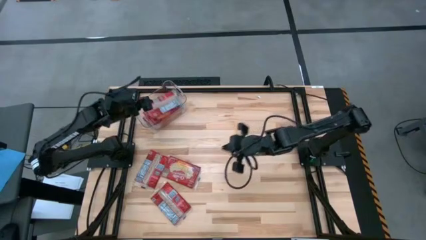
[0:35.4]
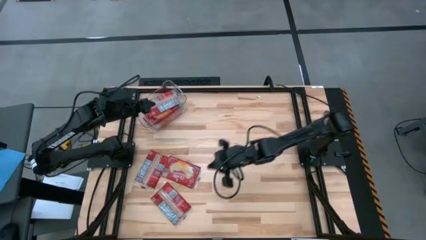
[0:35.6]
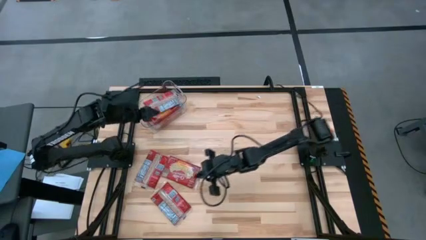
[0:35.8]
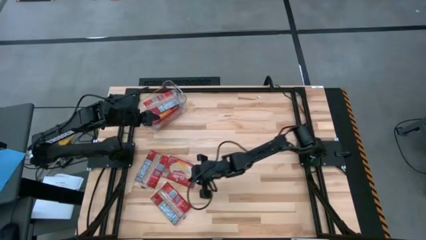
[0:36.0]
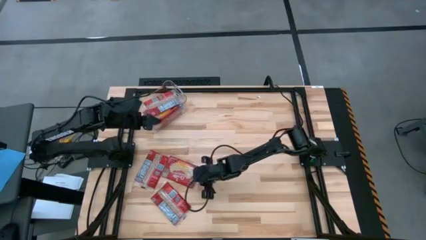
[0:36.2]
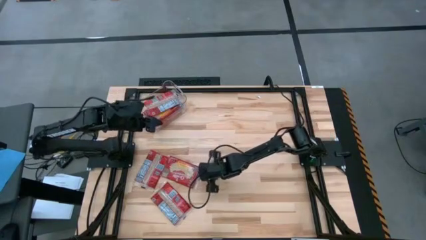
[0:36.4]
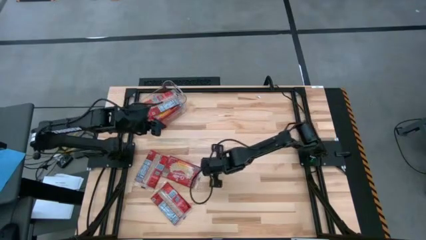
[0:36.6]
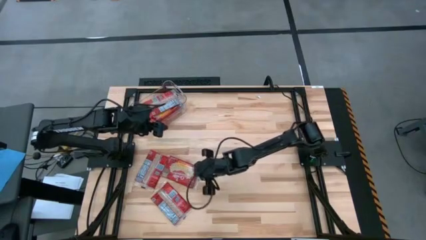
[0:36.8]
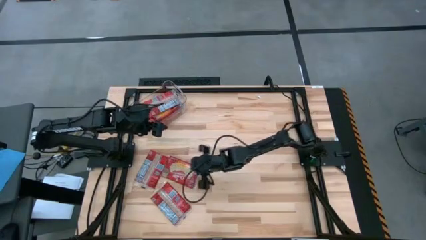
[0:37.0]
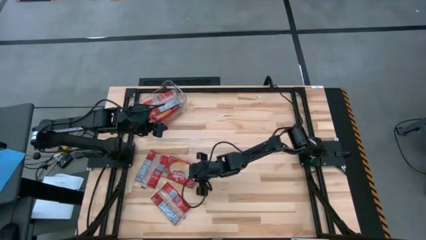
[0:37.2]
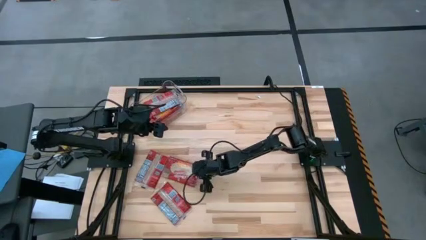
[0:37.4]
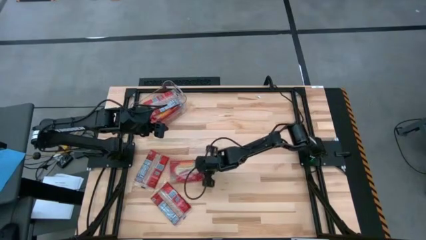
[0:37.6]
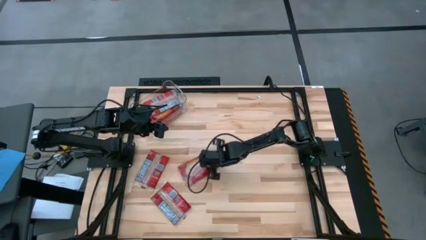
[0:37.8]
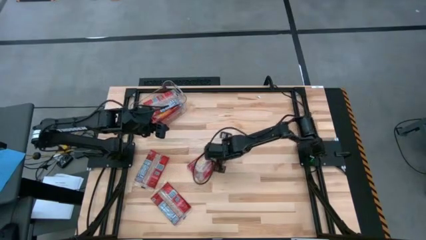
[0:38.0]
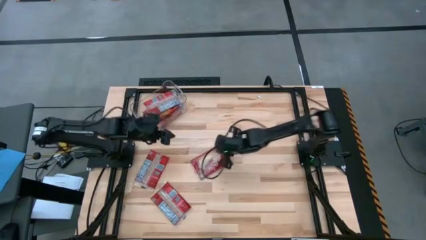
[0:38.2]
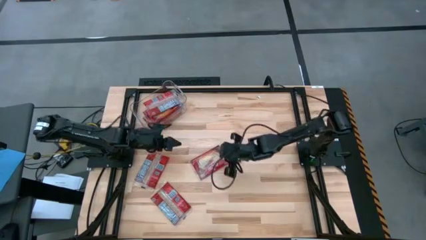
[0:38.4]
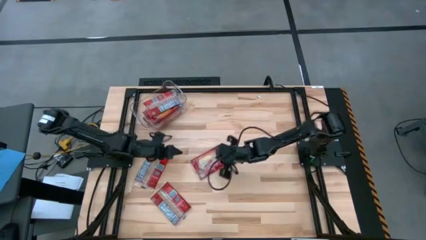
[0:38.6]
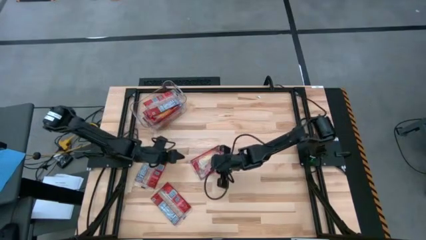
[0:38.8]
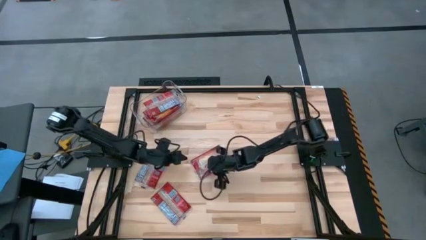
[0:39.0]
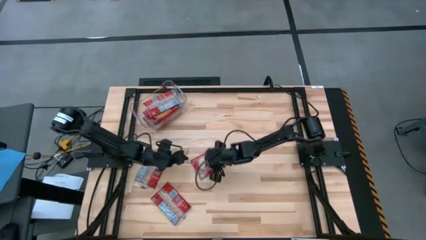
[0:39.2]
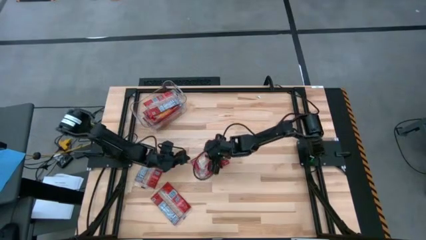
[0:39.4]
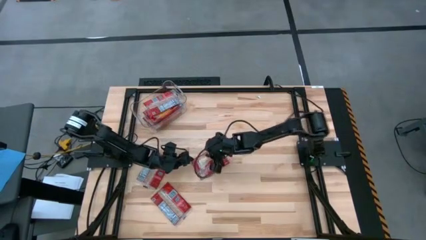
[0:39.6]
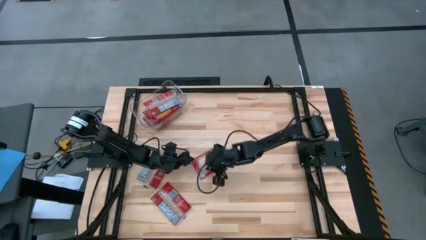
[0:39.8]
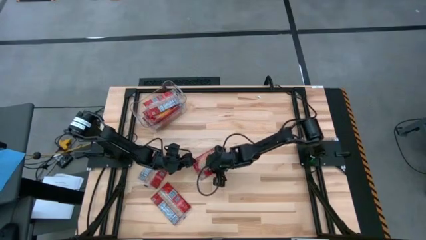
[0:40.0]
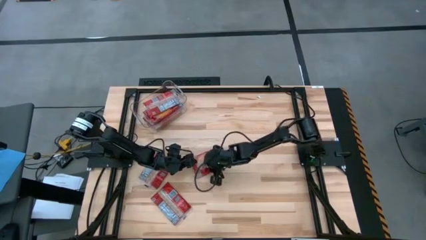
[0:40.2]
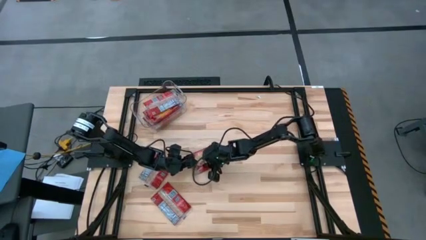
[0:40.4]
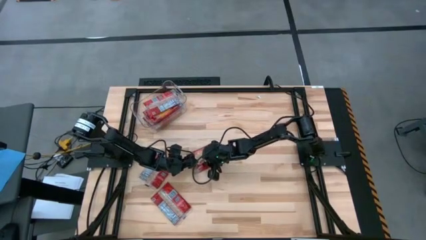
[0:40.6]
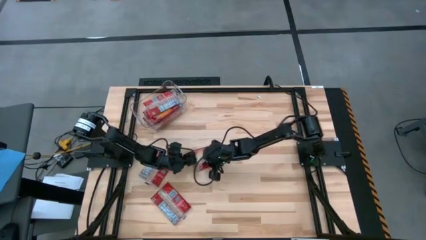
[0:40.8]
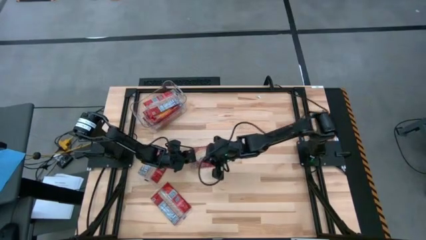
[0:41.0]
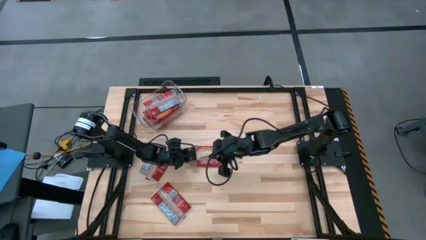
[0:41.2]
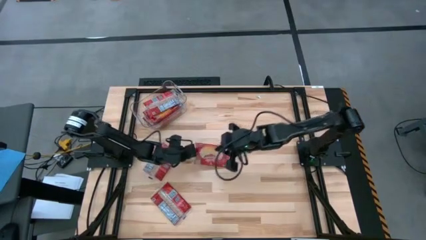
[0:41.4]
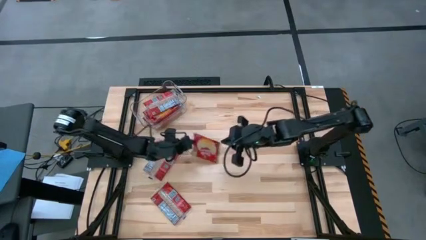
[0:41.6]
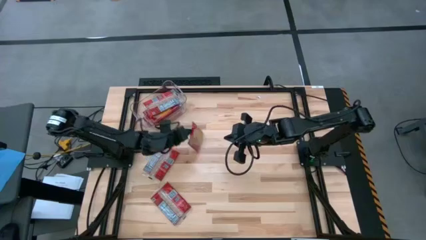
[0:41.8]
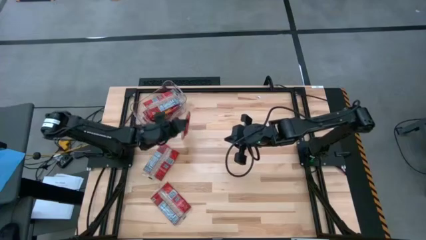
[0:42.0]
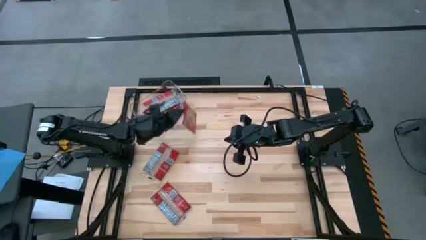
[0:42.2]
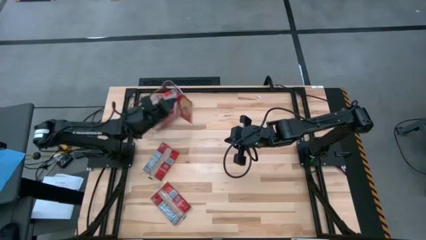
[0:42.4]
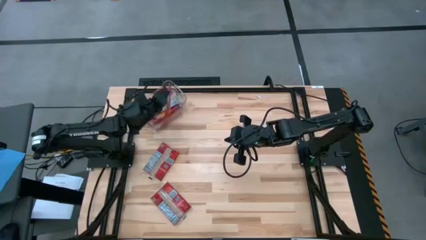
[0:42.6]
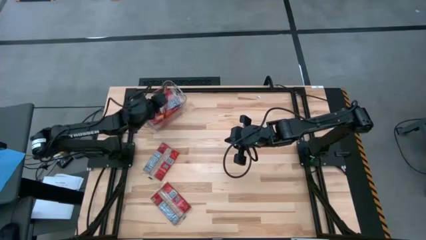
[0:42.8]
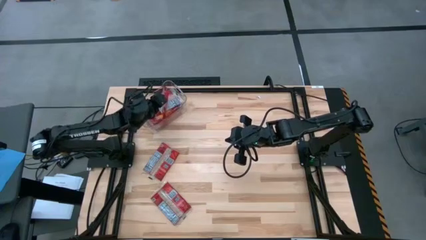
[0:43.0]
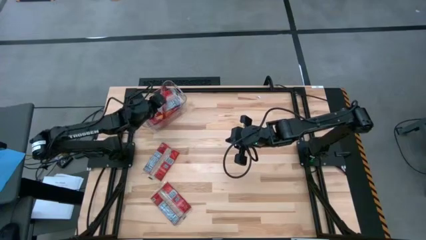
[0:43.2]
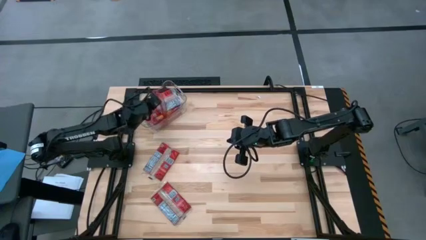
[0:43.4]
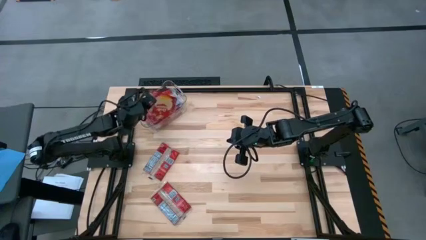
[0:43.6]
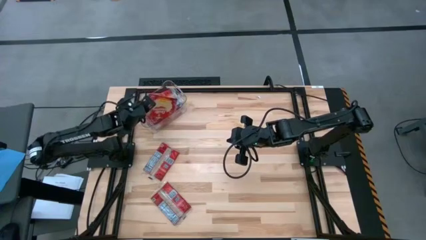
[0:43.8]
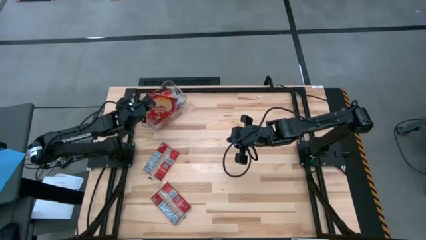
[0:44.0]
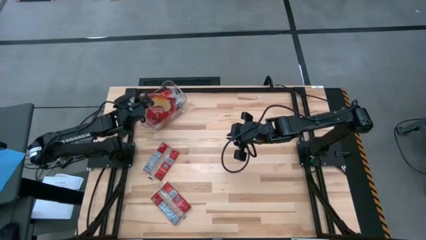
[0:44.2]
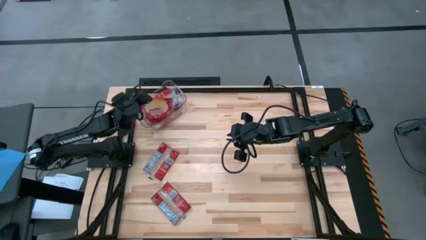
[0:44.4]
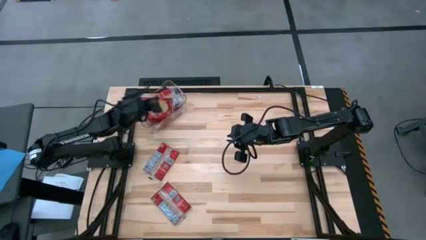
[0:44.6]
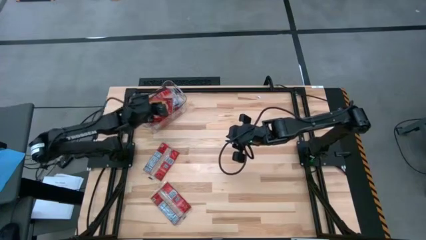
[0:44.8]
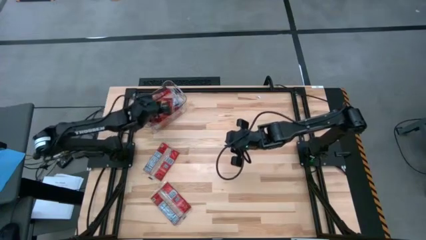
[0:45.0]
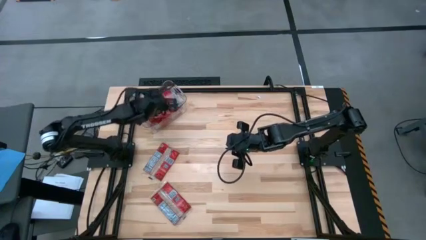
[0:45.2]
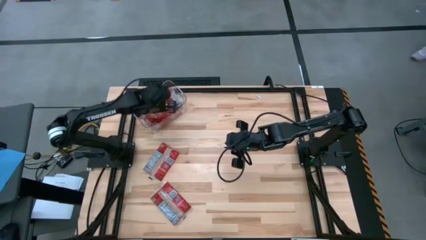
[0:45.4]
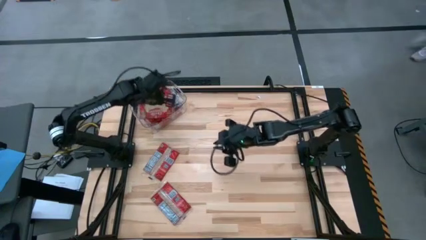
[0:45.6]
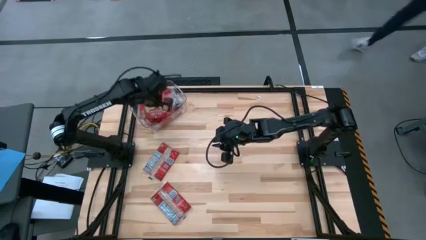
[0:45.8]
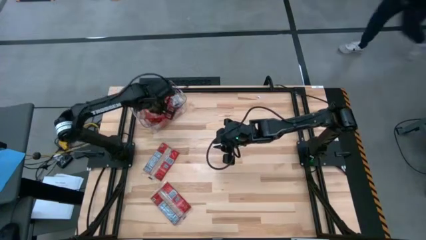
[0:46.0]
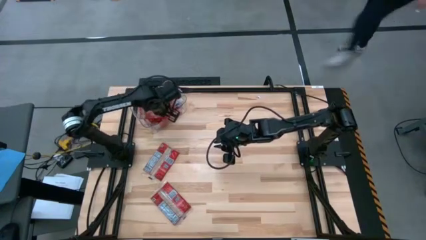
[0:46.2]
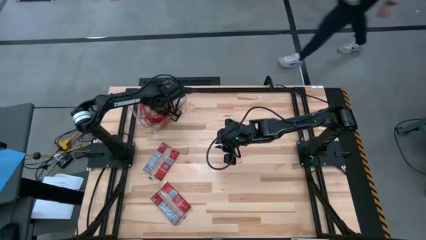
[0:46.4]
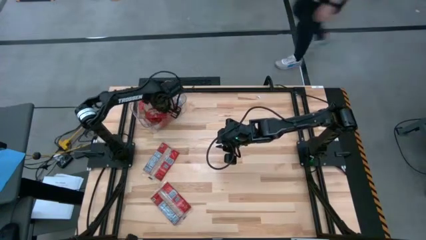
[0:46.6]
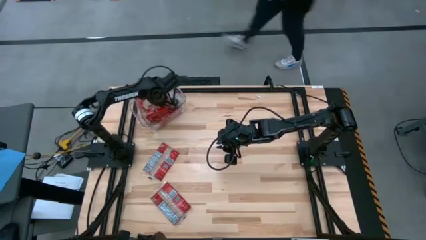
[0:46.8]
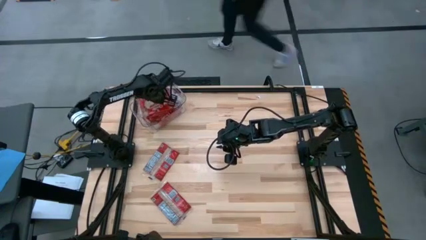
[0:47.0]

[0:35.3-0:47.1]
Task: Sort popcorn bags into baskets
Put the red popcorn bag into the transparent bin

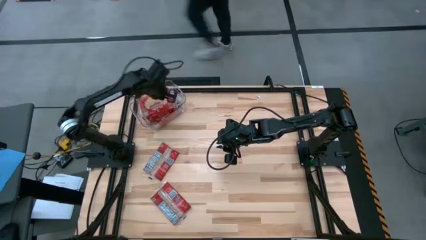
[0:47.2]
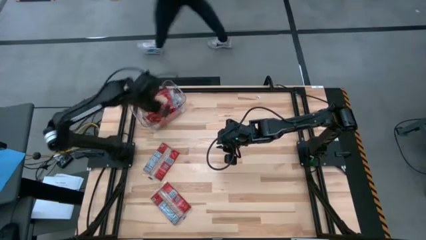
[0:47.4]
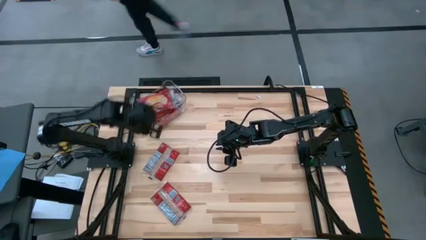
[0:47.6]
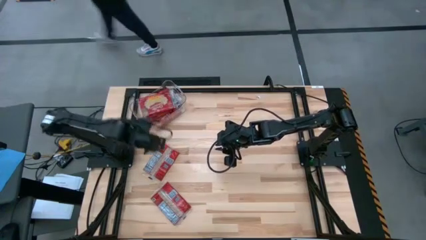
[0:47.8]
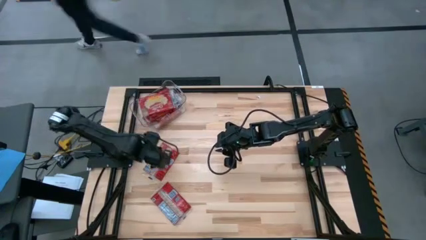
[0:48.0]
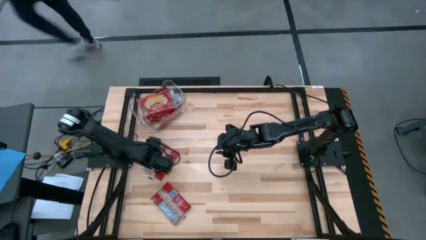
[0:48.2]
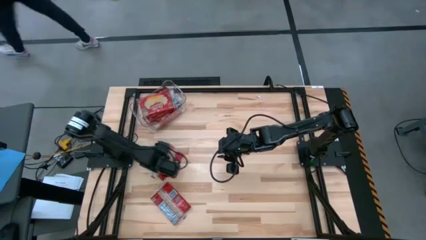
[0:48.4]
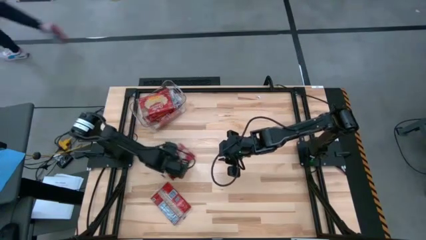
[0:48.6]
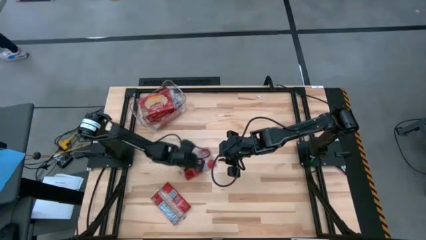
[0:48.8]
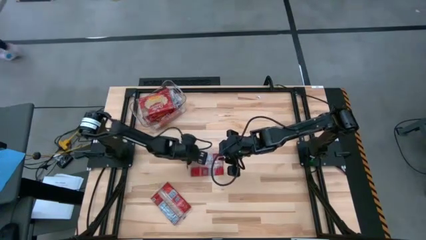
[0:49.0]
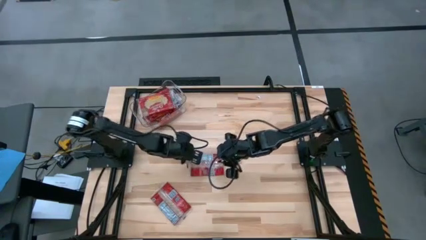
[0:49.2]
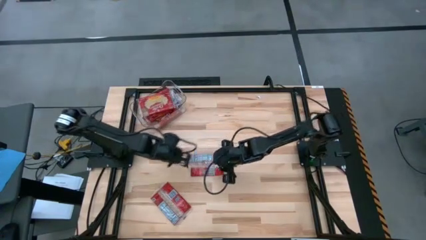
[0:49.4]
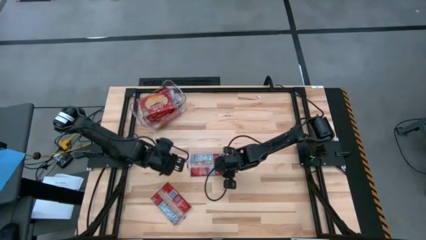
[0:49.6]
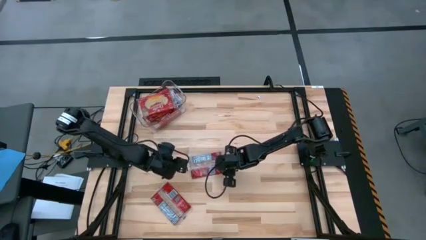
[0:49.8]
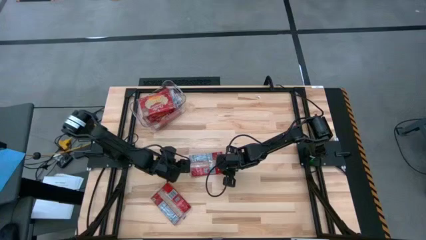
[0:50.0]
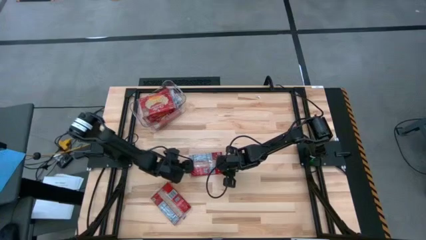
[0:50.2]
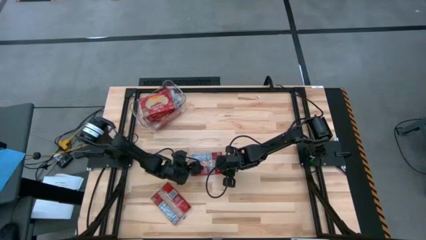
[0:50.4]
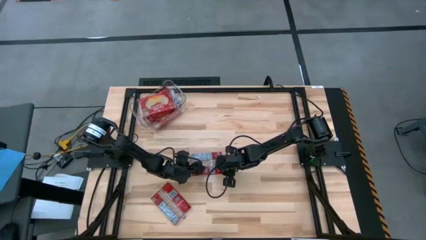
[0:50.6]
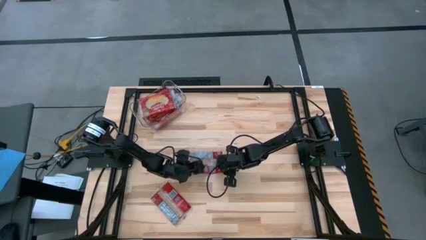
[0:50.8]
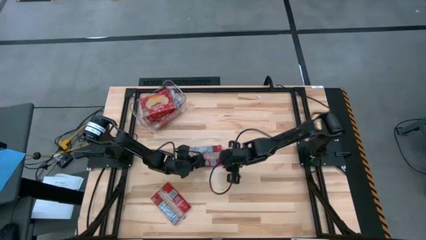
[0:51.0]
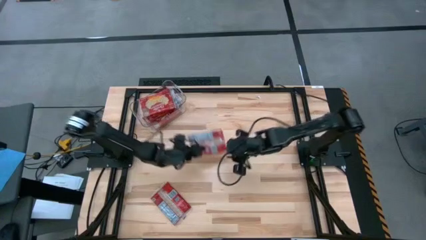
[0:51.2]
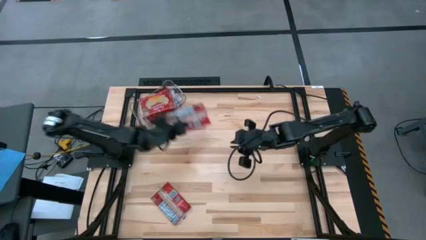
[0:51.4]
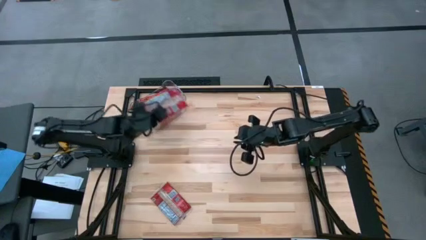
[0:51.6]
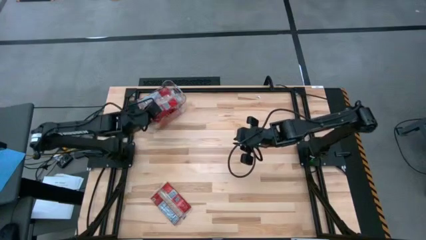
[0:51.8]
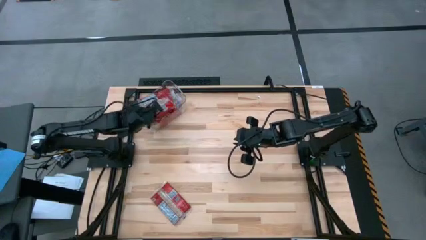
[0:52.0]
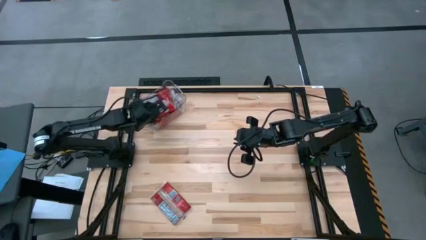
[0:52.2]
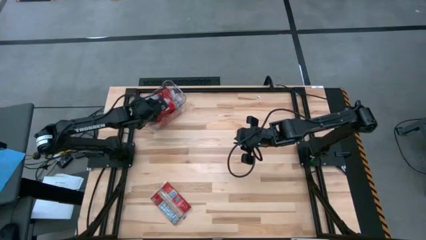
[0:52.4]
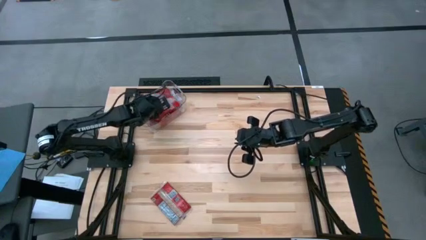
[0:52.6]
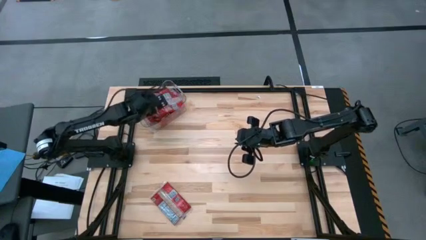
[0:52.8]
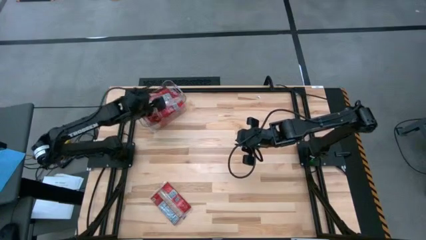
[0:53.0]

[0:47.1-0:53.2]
Put the red popcorn bag into the transparent bin
